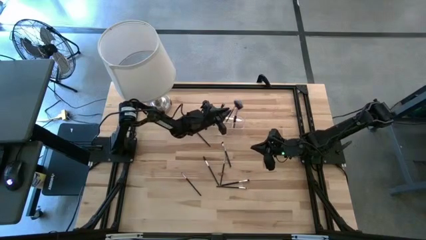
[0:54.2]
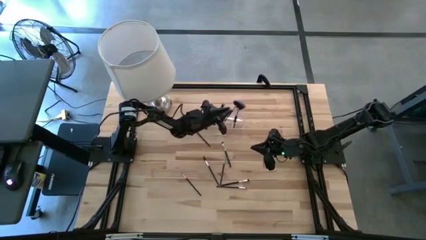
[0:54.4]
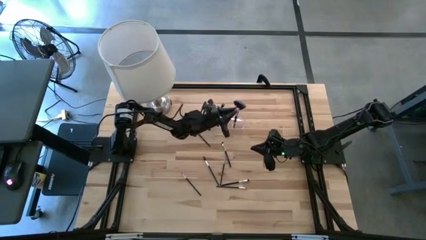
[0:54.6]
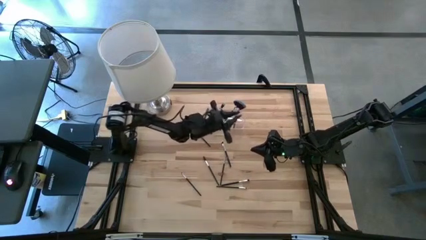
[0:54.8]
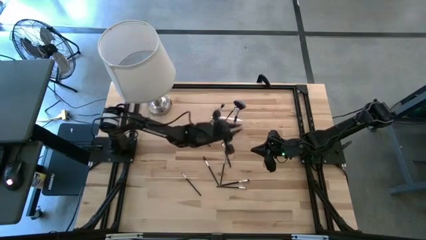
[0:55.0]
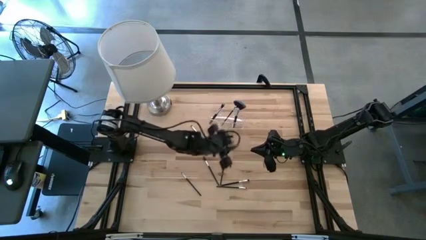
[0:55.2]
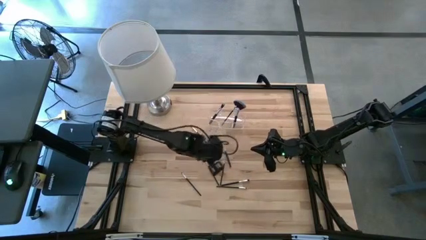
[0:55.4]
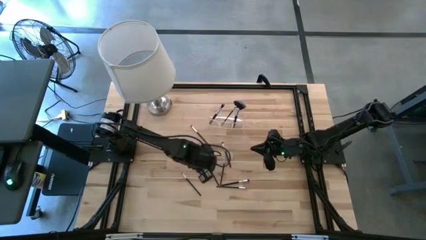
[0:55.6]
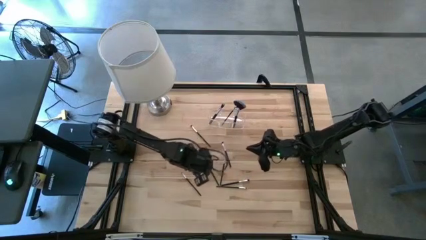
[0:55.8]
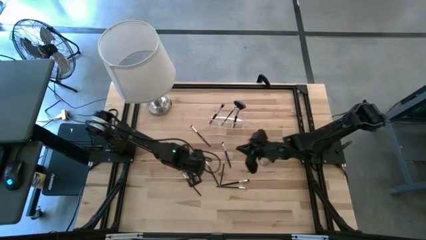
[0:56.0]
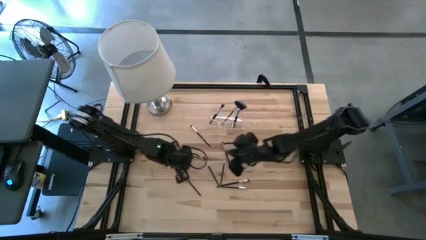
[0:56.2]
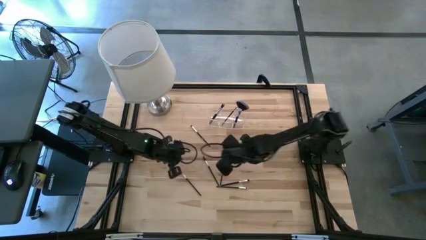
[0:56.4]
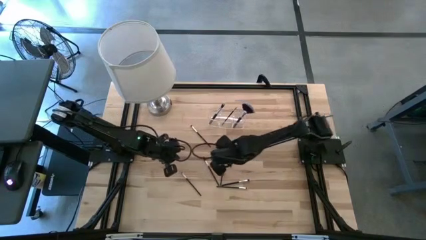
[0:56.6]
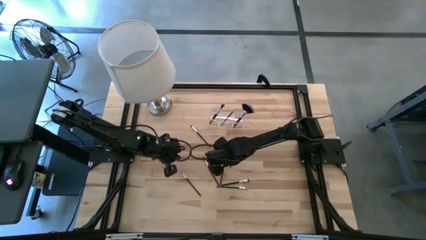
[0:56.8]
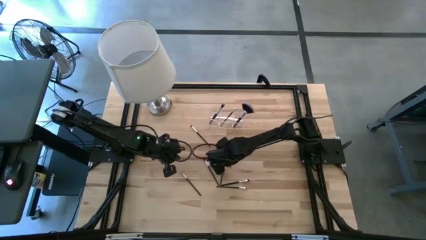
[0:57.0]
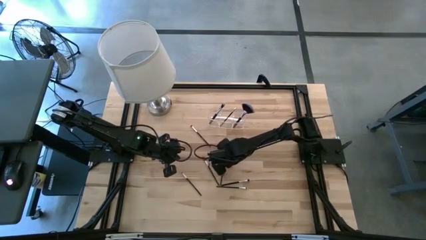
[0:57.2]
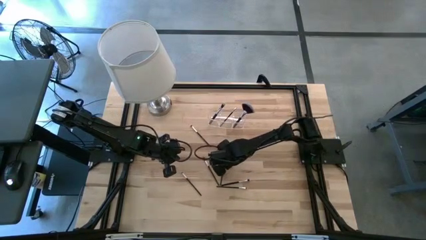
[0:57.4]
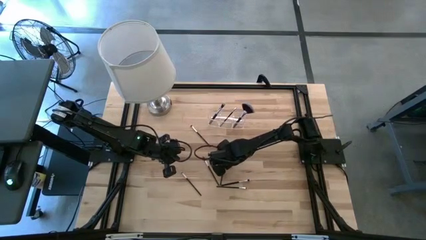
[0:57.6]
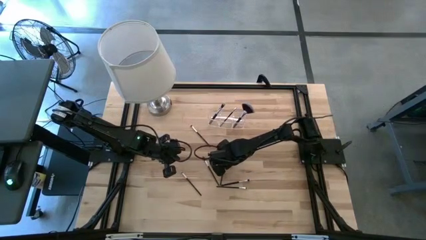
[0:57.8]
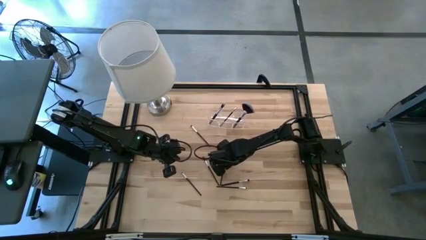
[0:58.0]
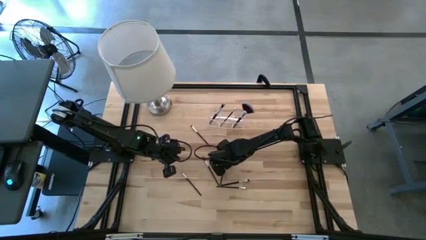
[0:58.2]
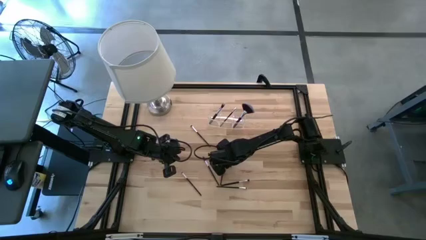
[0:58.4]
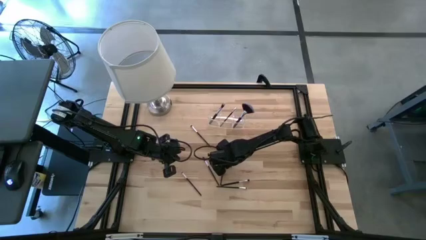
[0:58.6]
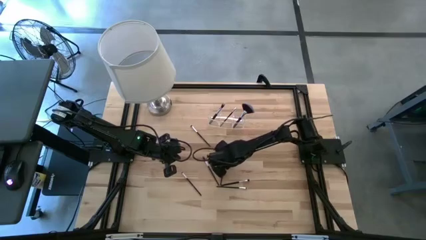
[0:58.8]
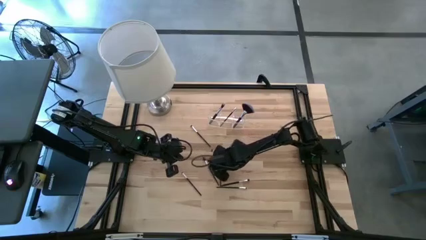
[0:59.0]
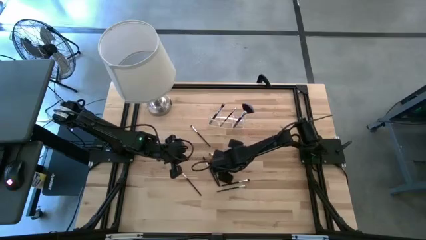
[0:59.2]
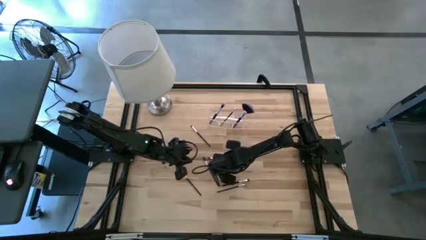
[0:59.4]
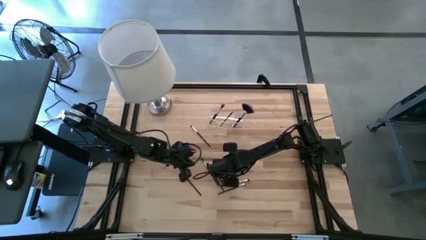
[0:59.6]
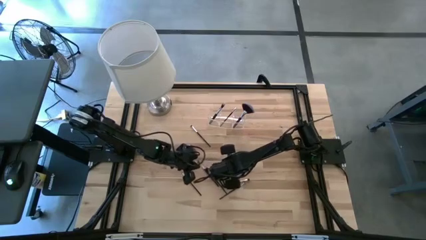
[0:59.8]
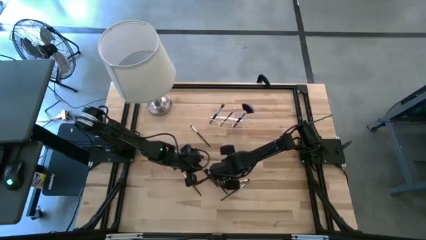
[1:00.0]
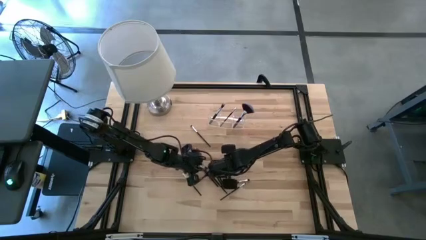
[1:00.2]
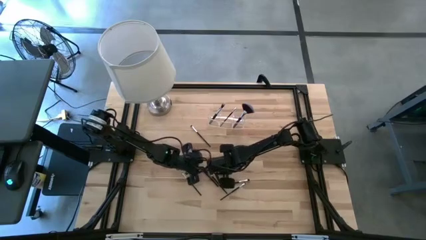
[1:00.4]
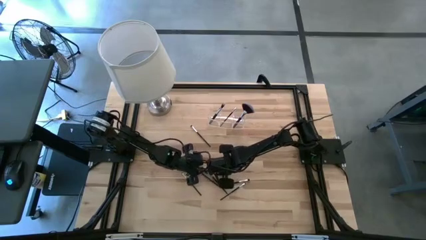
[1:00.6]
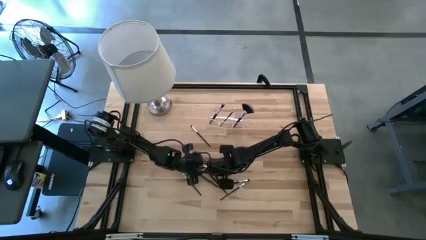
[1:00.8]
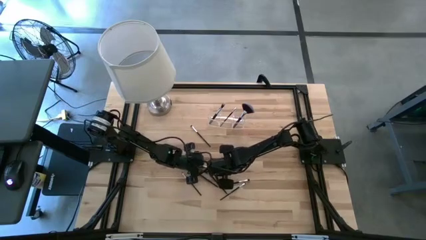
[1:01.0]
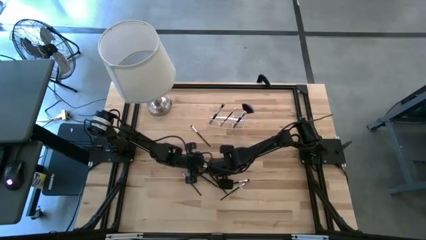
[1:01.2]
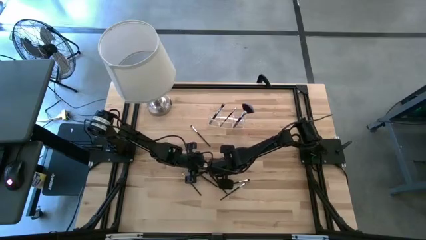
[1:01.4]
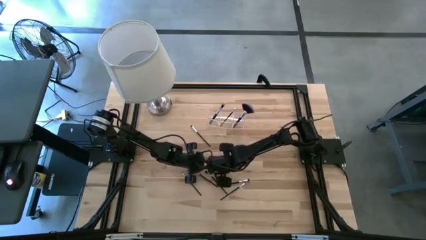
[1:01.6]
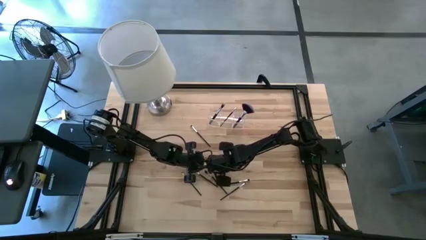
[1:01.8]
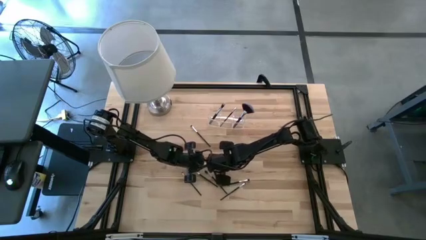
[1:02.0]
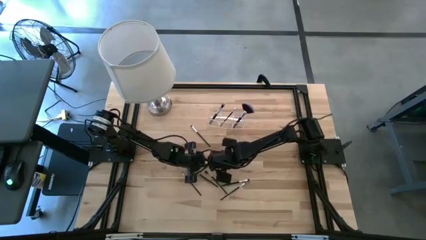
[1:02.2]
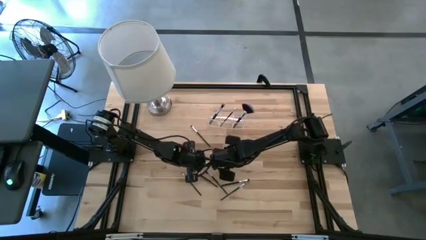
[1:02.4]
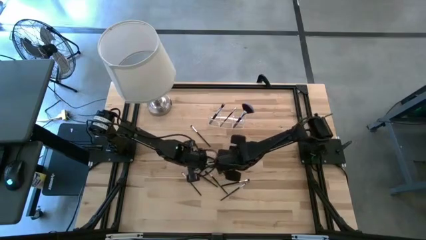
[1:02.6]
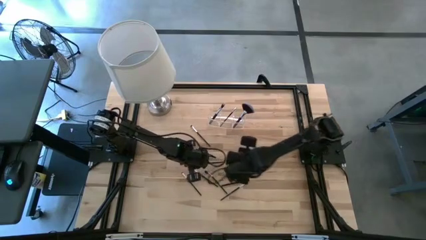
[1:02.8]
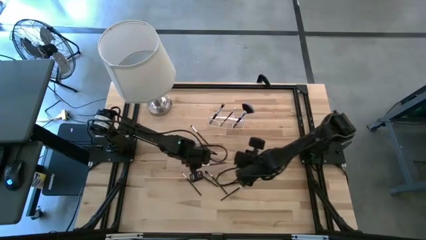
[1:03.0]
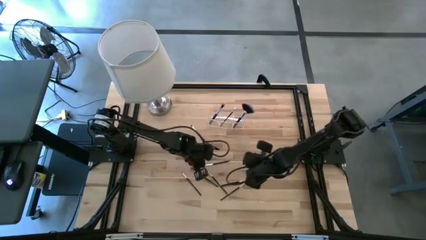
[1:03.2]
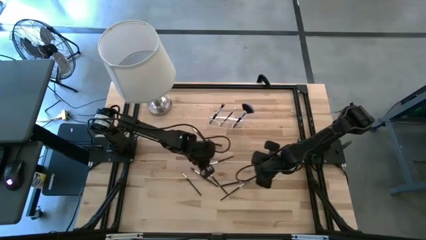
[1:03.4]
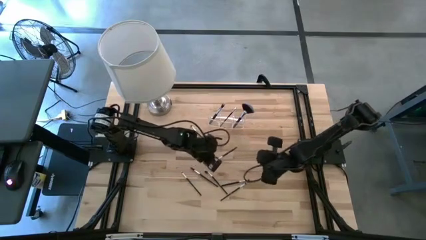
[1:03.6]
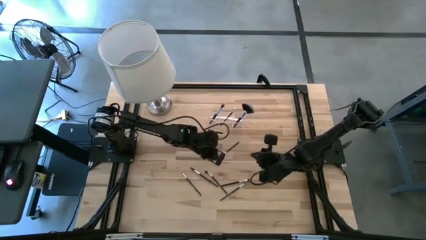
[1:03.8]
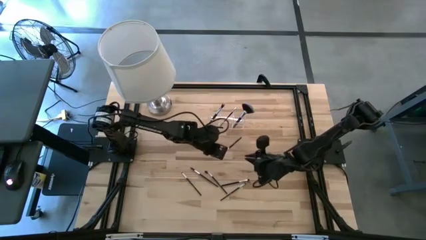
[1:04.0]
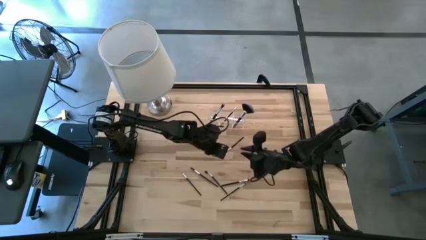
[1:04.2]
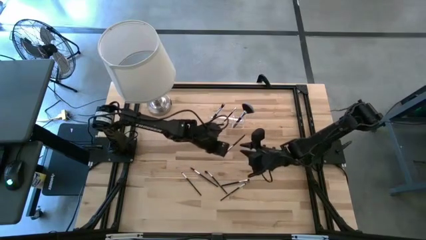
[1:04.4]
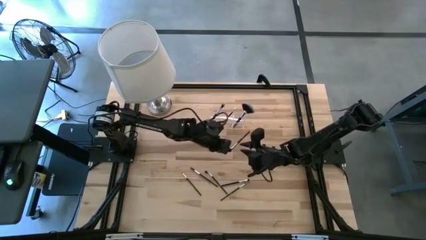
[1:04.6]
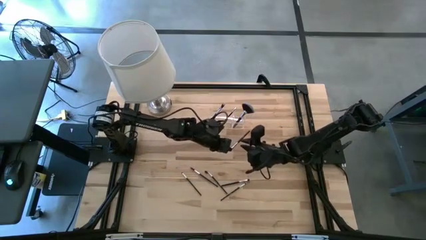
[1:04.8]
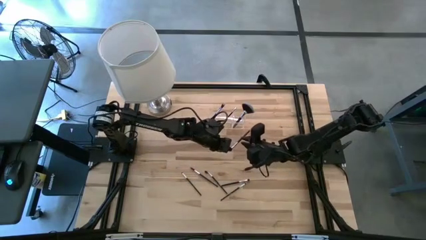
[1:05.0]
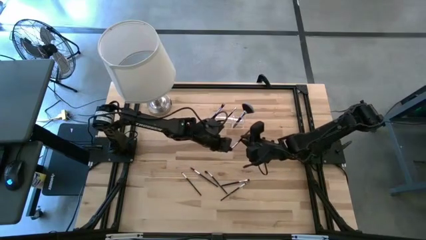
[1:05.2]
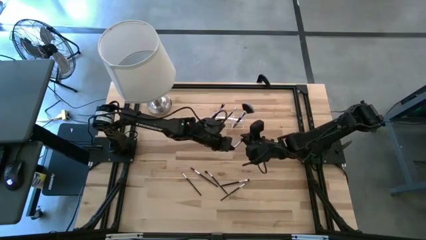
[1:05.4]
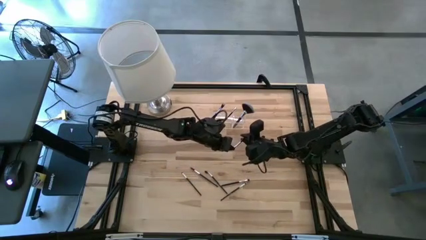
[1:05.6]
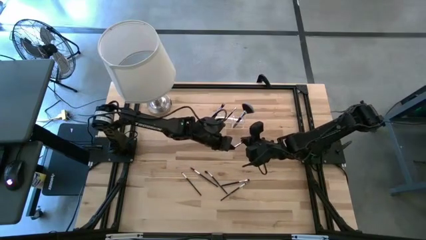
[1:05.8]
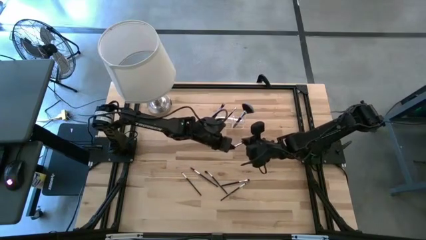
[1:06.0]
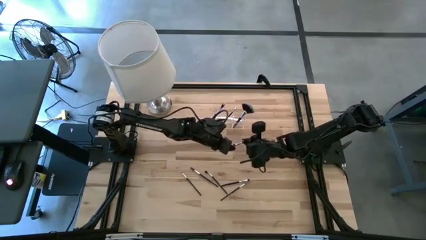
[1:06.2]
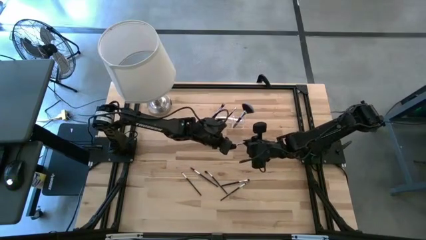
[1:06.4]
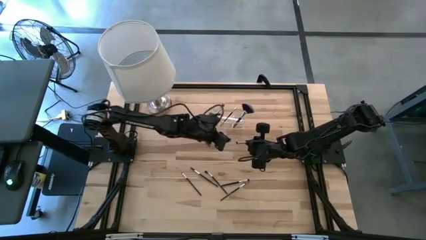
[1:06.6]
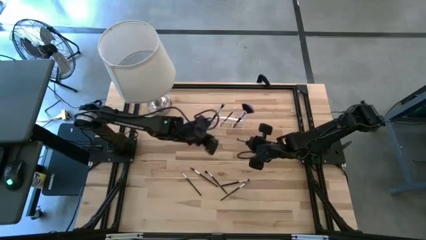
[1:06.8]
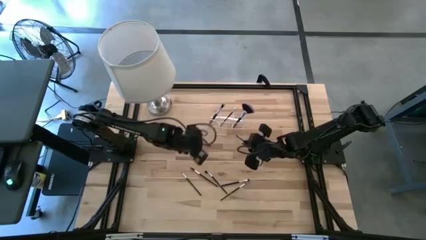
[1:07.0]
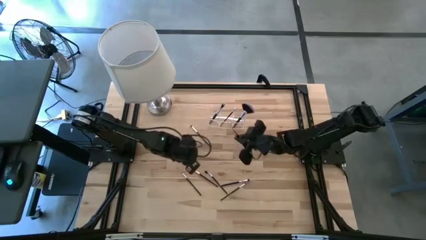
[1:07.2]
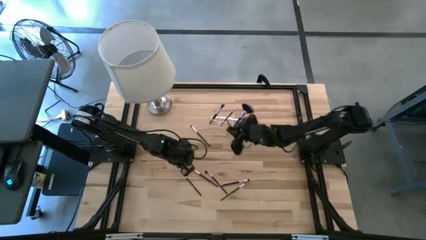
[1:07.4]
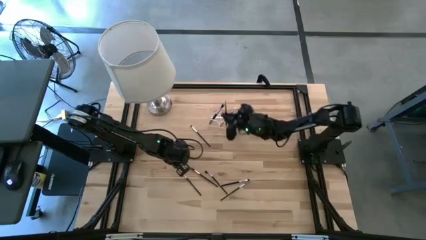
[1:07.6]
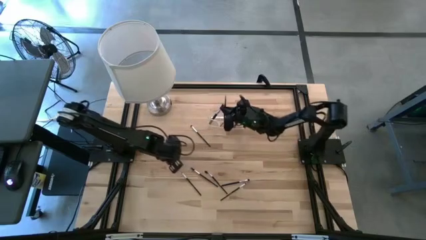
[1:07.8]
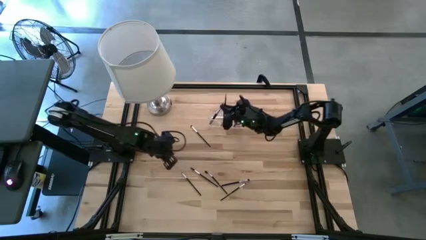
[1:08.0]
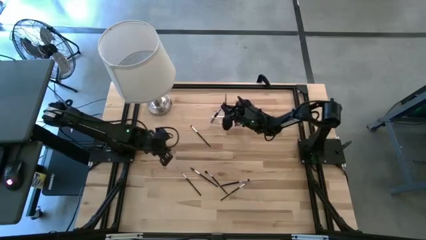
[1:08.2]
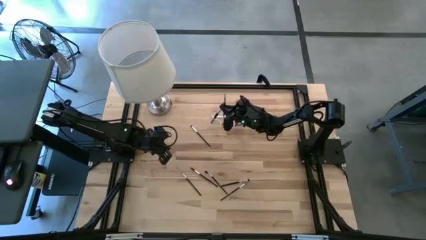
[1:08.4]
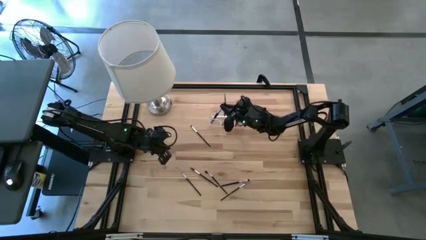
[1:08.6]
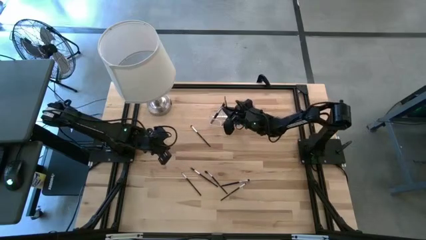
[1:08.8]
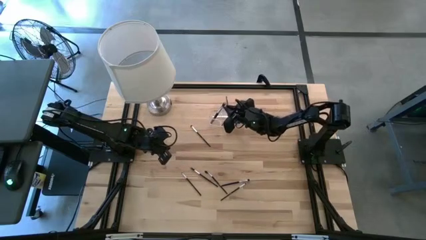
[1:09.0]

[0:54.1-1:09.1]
Task: Put items in baskets/containers
Put the eyeshadow brush into the transparent organizer
